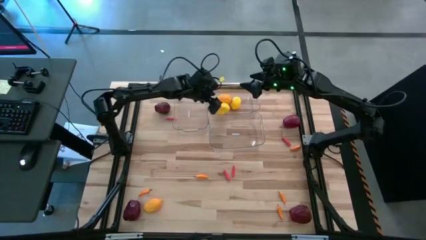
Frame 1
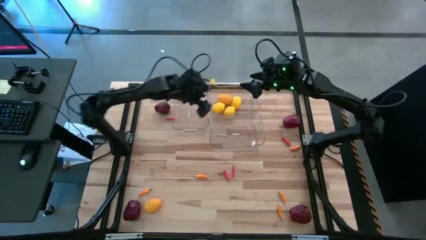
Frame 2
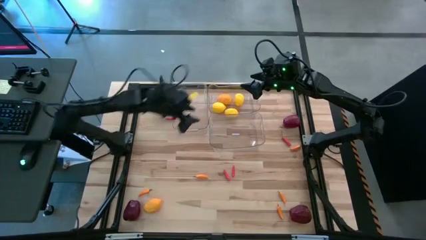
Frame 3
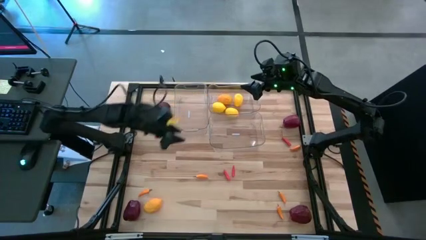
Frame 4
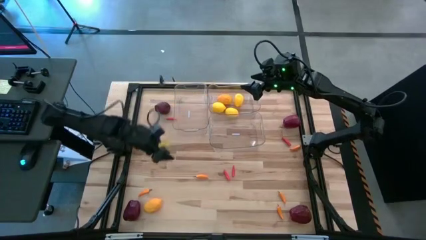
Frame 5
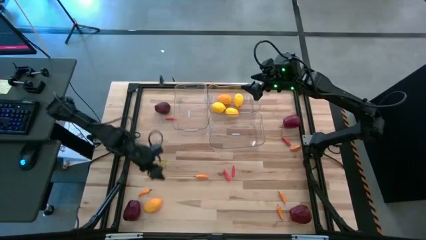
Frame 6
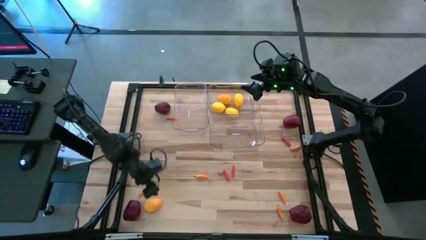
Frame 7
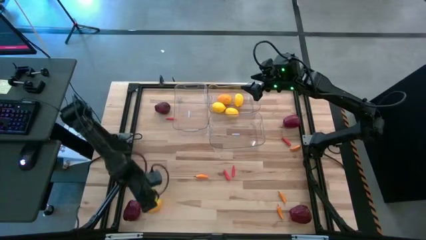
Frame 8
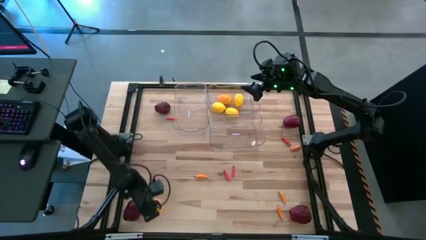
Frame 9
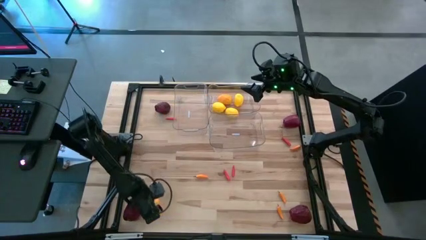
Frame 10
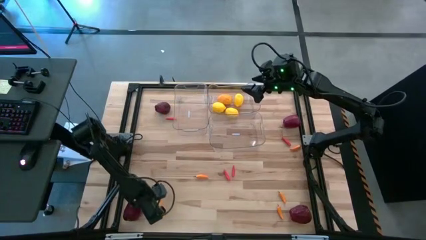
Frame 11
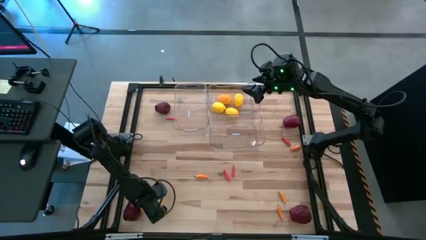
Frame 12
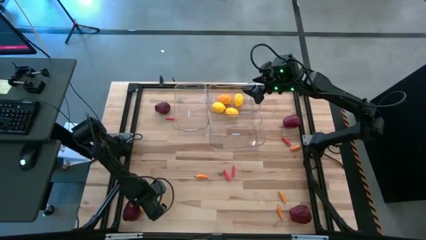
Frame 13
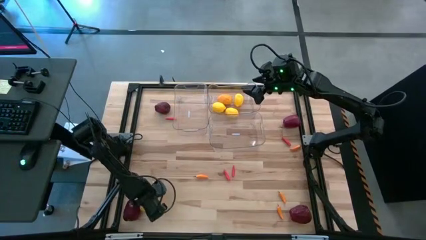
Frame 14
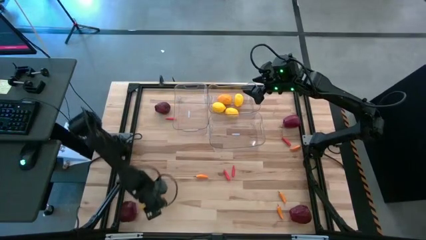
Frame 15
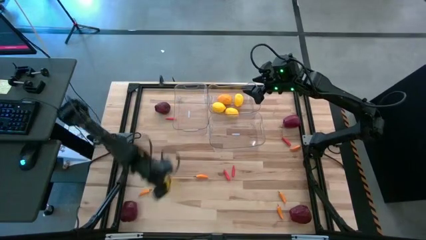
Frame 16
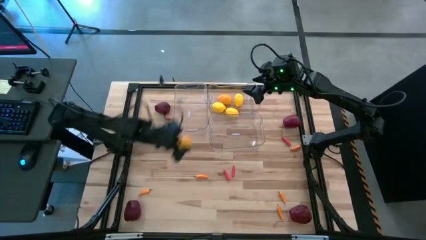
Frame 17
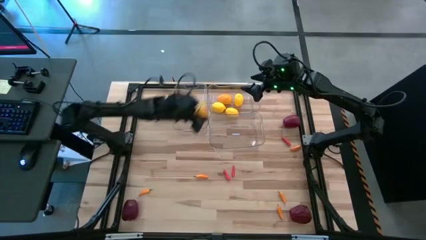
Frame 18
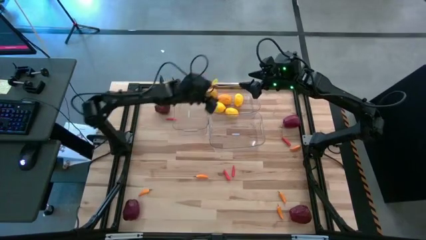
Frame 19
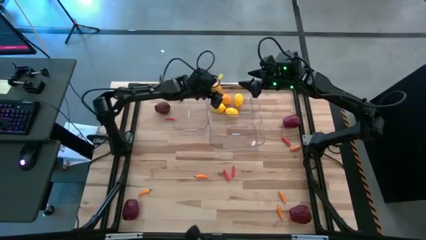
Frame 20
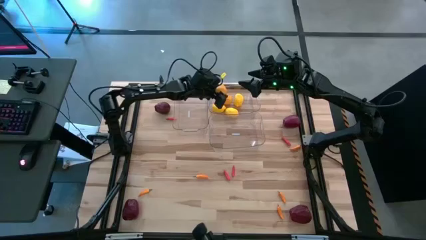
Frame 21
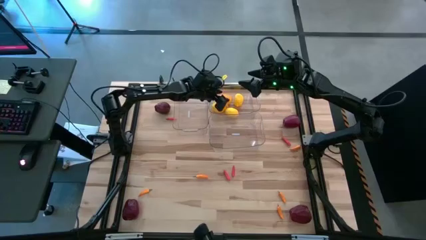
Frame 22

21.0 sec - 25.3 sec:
Task: Sort produce into baskets
Put the lemon into the top right transparent bin

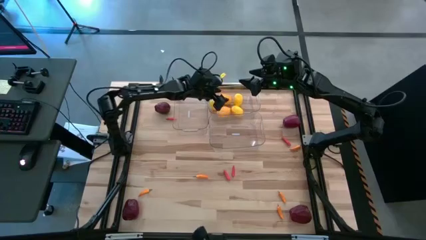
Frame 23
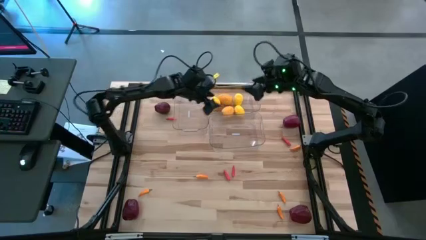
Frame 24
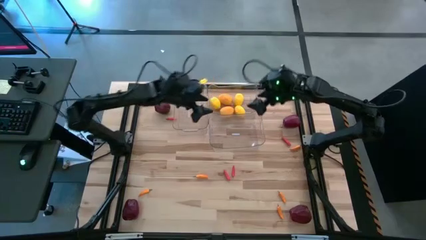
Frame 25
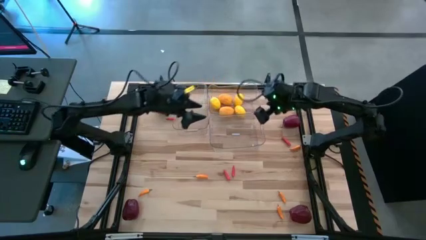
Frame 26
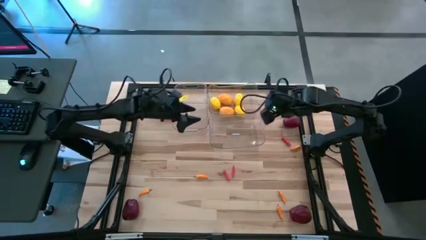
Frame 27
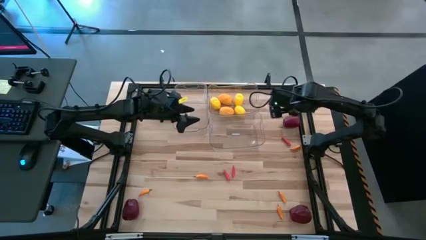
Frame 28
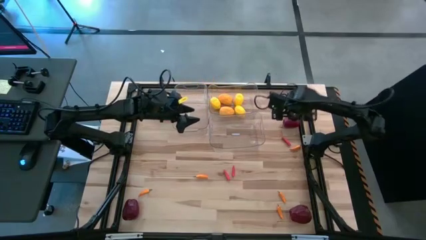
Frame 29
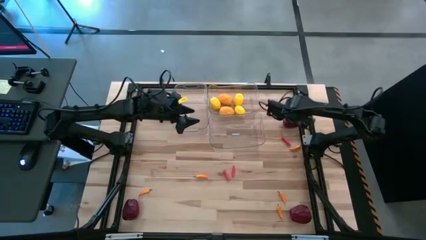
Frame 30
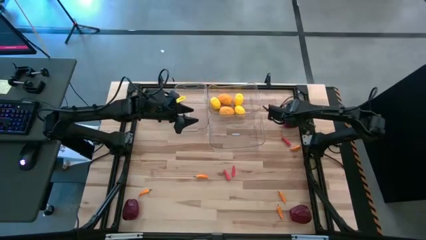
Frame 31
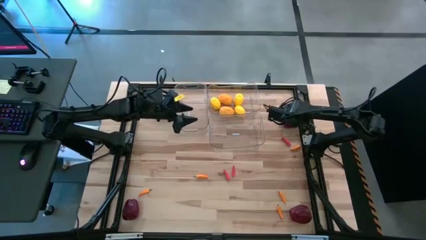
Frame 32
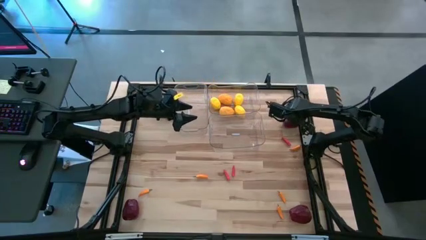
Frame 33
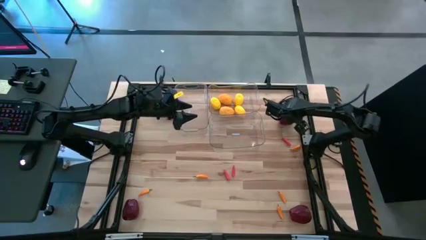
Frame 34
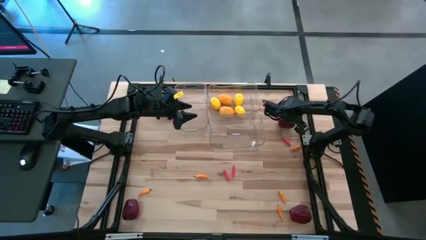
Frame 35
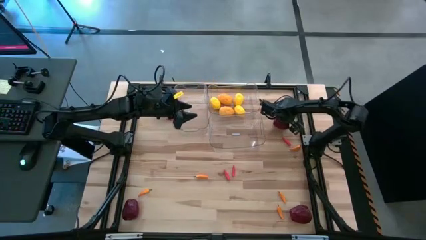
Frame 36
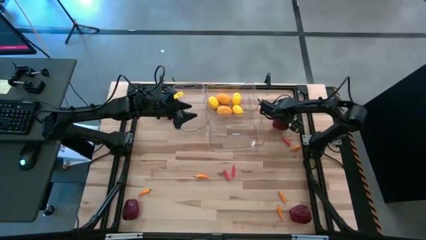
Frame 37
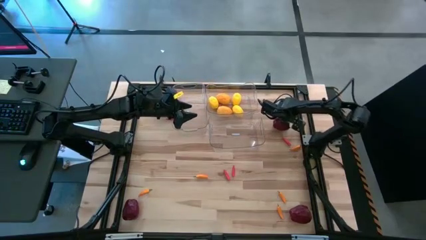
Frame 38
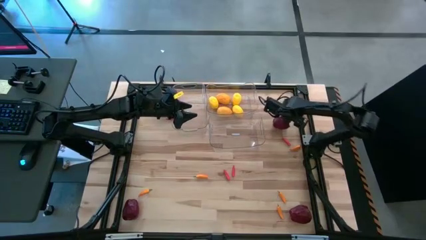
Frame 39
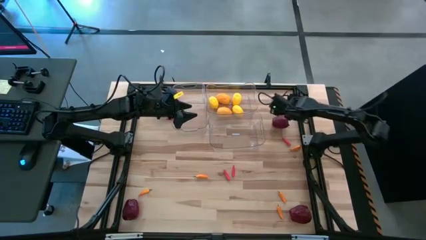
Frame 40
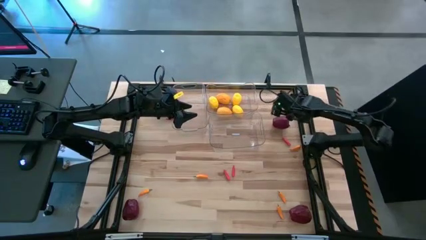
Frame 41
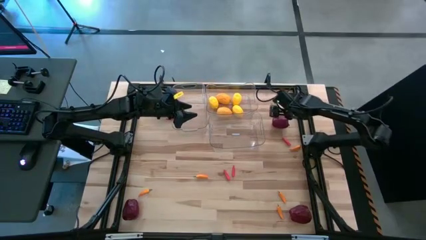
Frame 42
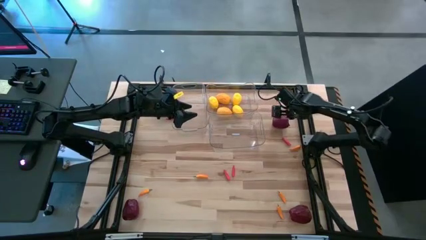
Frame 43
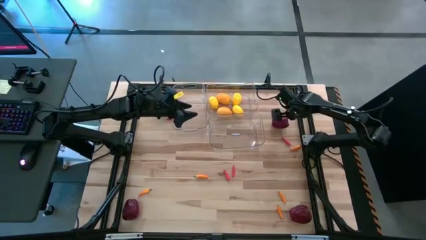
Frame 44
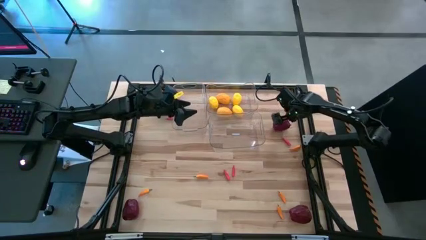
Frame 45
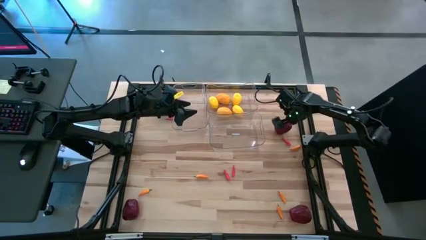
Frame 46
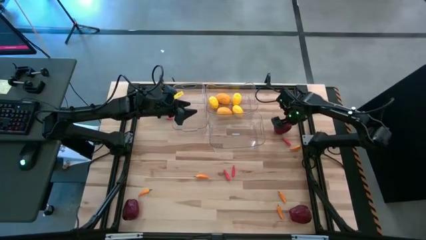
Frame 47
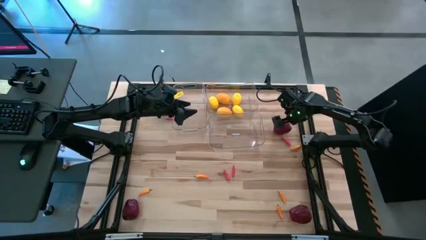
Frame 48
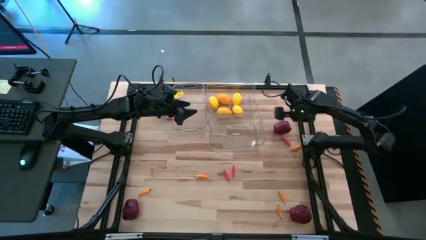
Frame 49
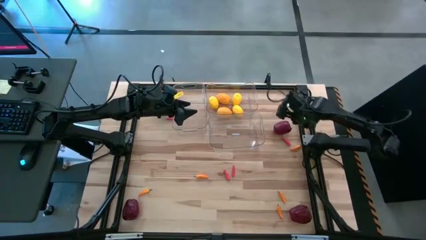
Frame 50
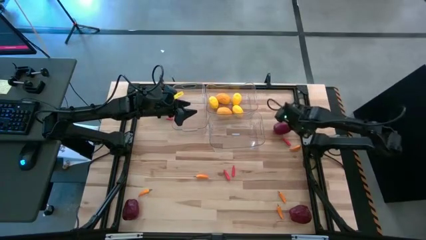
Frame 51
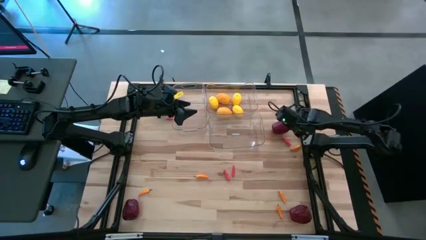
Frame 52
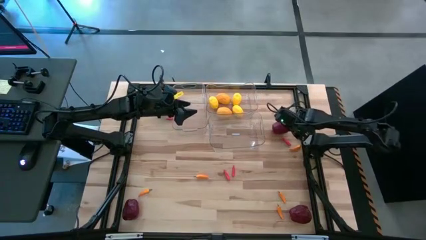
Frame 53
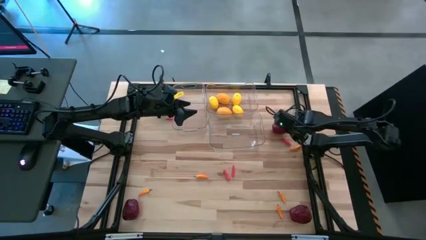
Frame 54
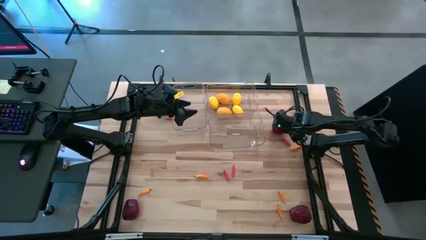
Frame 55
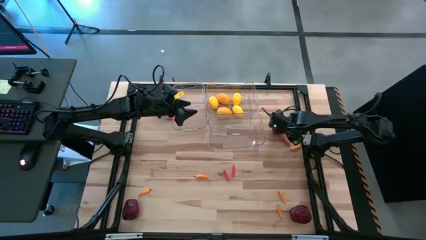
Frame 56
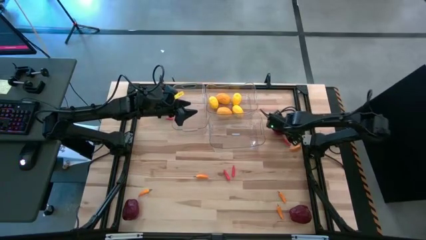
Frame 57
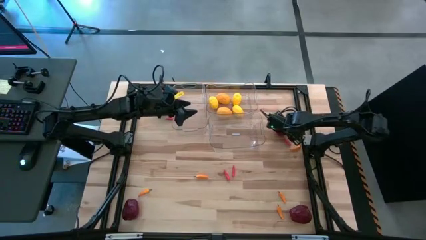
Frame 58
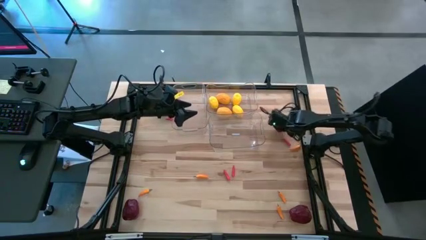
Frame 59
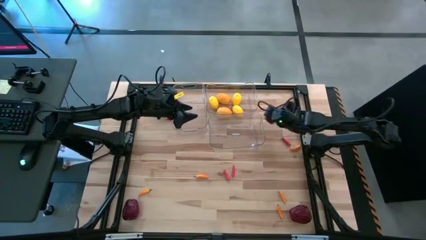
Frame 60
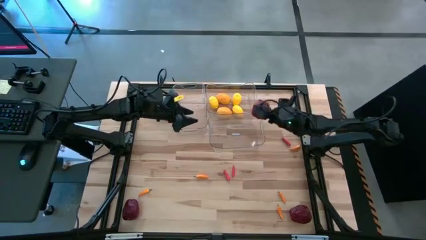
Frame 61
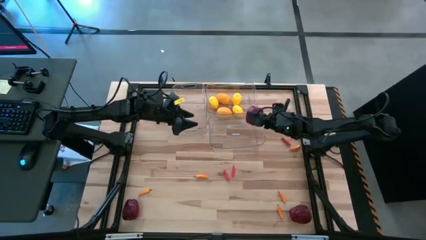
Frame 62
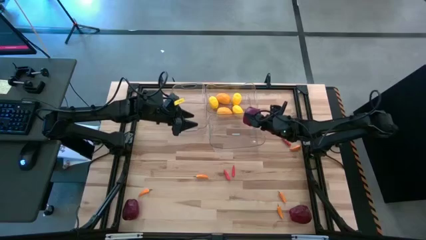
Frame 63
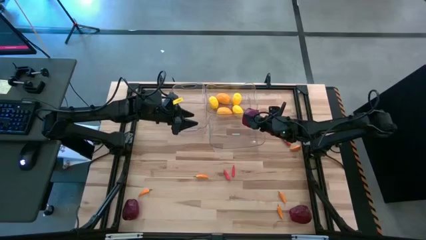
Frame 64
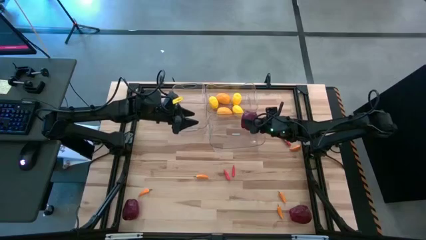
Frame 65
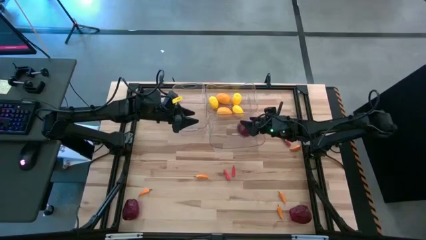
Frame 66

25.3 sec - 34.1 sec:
Put the apple into the bottom transparent bin

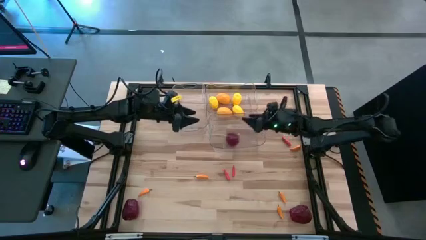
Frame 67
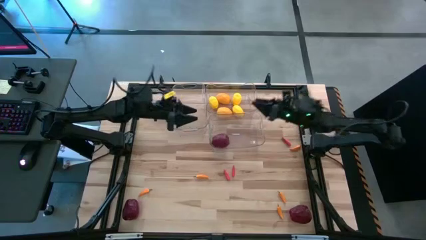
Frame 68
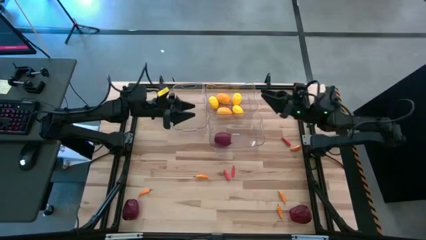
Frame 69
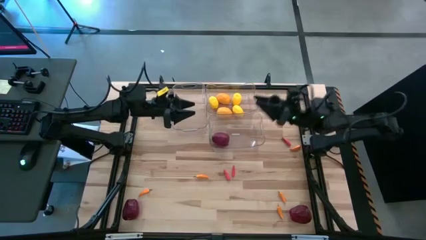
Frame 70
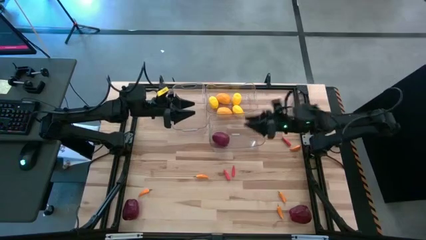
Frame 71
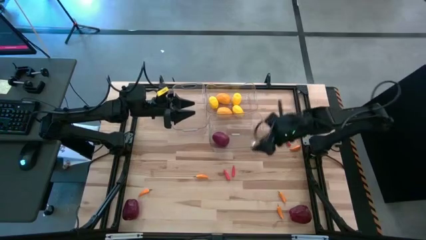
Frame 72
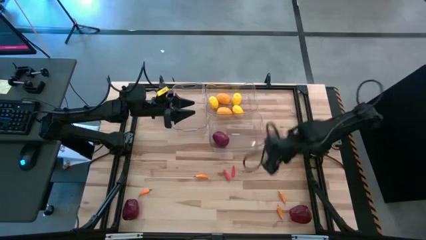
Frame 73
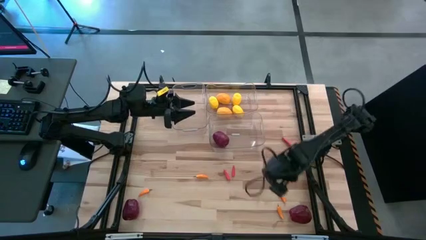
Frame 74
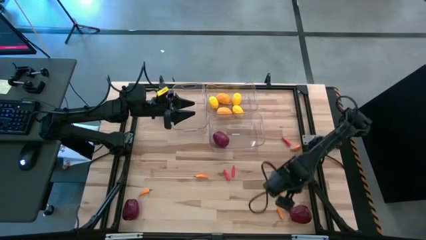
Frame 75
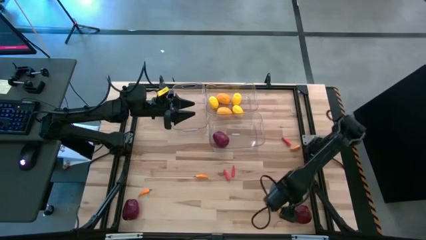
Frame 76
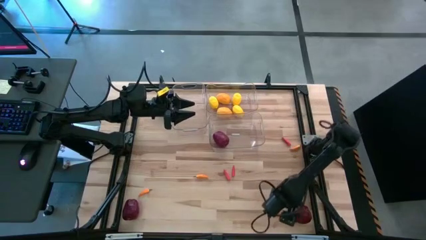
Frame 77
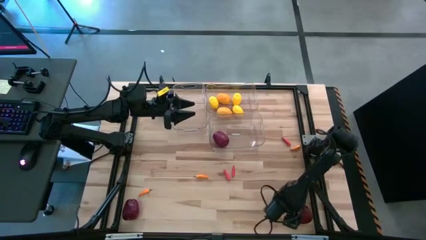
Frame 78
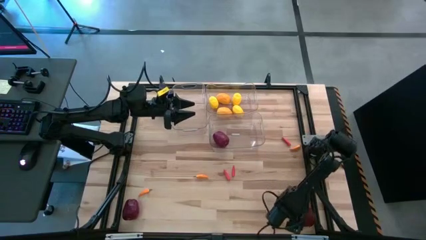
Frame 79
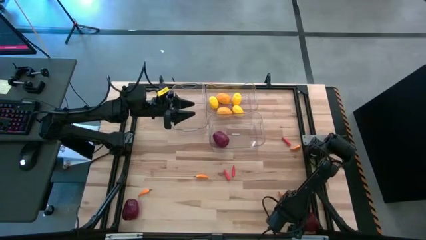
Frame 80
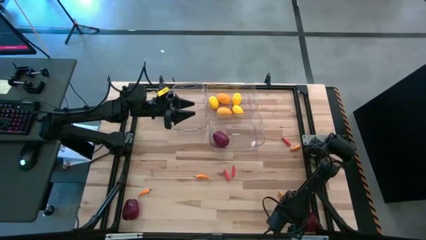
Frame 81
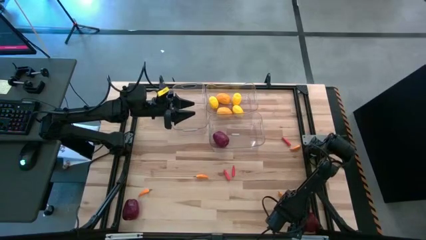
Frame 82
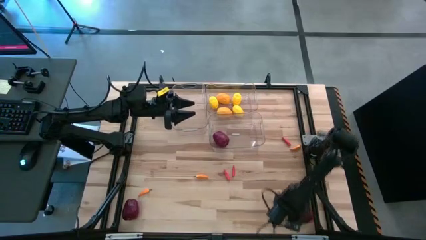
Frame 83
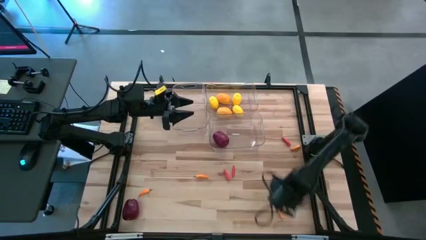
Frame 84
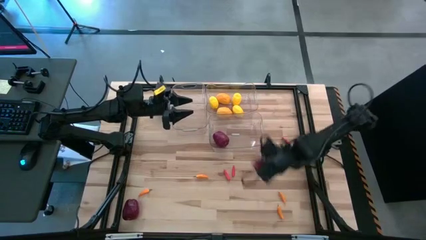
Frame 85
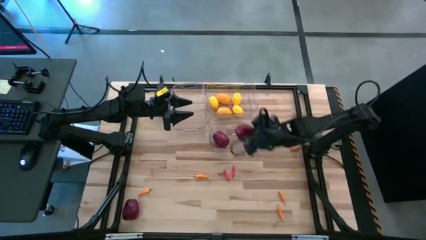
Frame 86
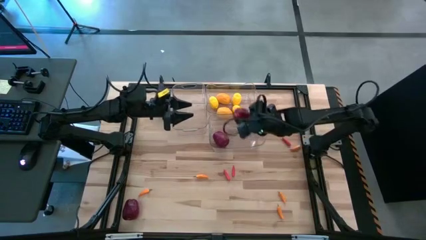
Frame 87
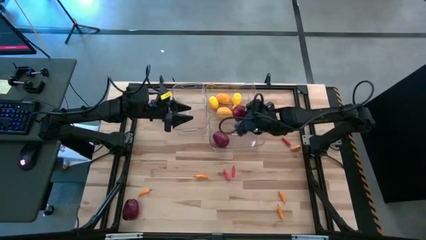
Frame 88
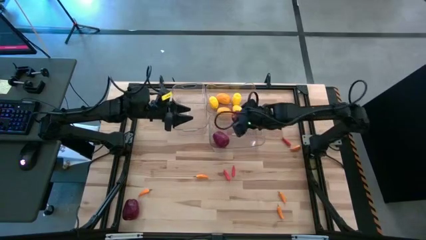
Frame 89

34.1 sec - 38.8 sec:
Put the apple into the bottom transparent bin
